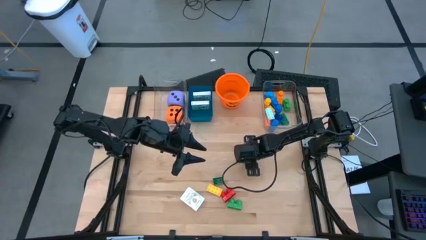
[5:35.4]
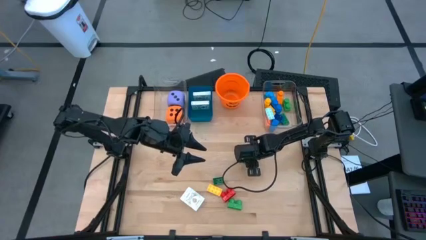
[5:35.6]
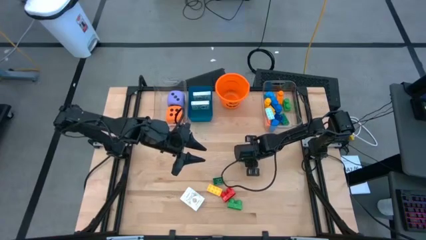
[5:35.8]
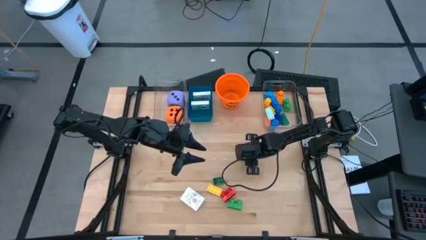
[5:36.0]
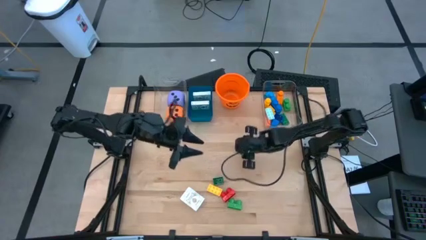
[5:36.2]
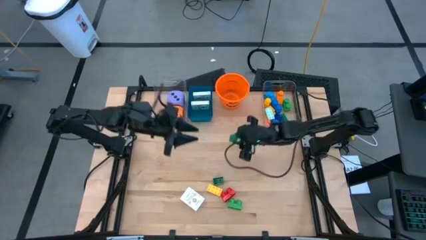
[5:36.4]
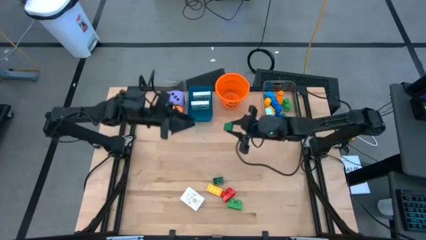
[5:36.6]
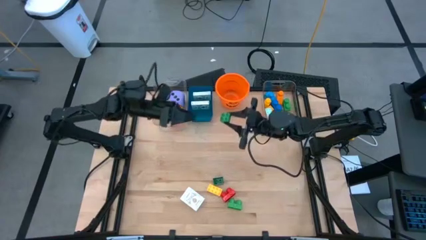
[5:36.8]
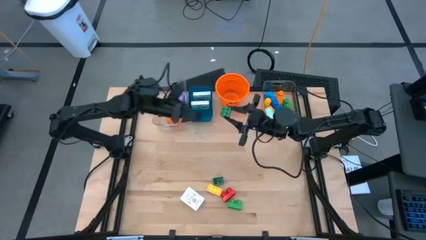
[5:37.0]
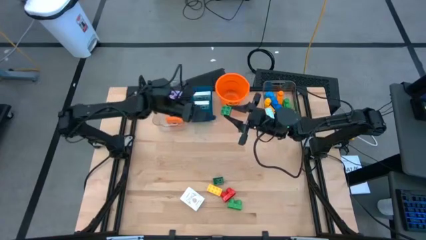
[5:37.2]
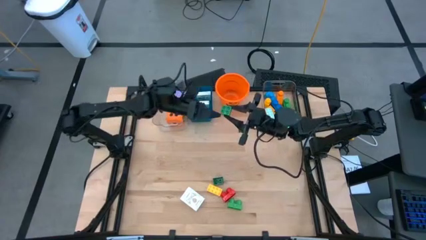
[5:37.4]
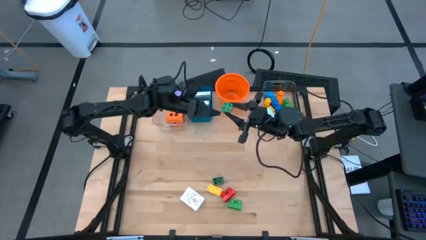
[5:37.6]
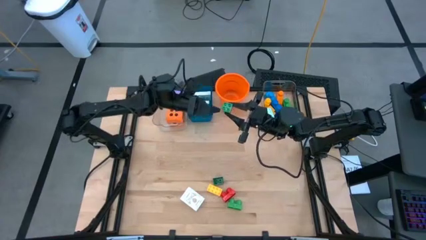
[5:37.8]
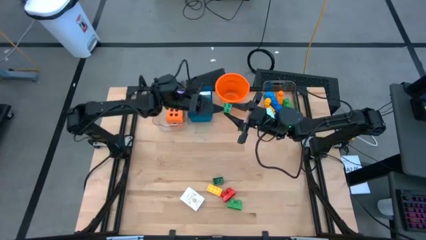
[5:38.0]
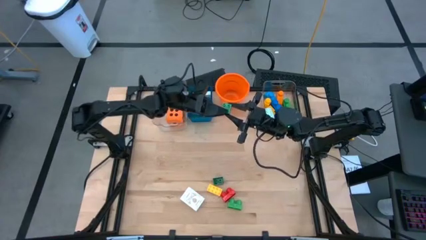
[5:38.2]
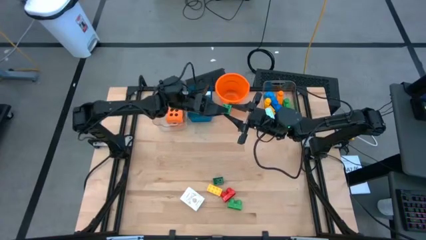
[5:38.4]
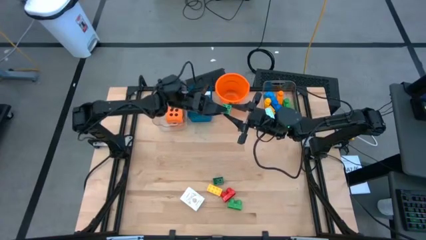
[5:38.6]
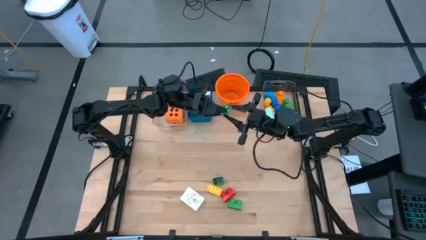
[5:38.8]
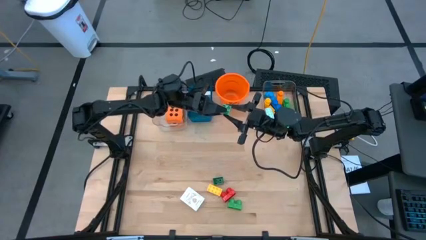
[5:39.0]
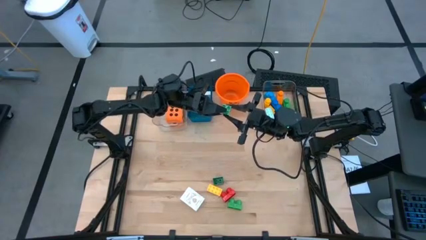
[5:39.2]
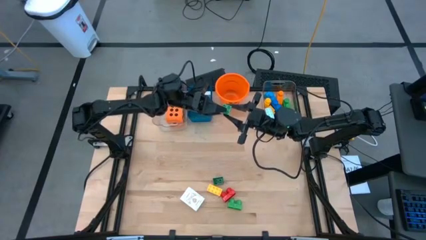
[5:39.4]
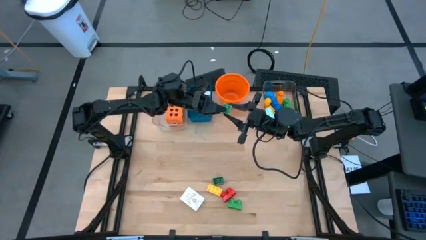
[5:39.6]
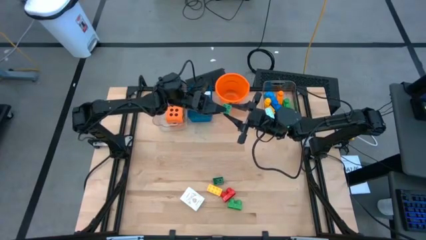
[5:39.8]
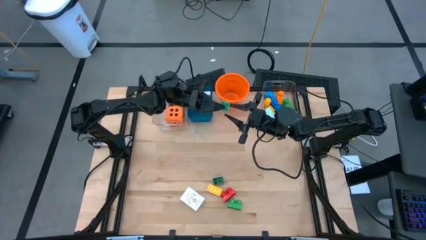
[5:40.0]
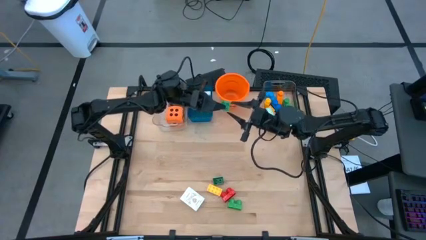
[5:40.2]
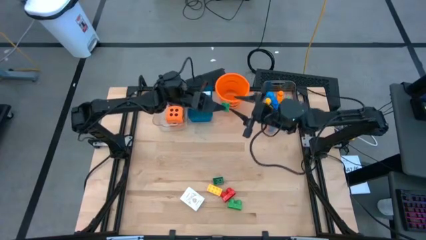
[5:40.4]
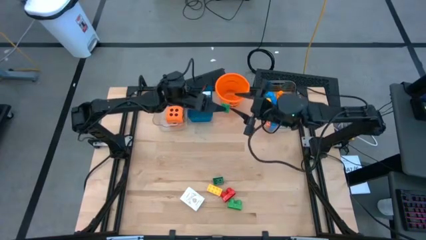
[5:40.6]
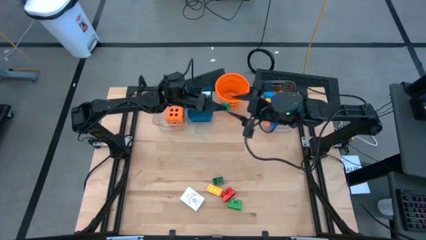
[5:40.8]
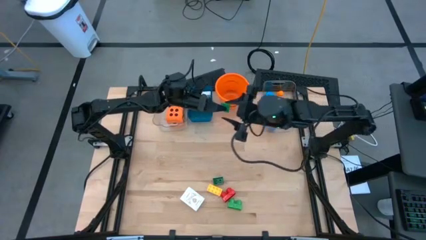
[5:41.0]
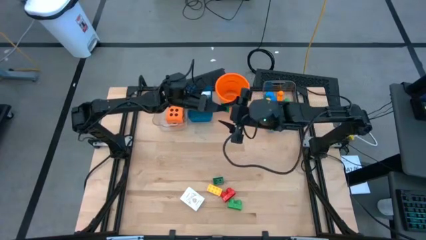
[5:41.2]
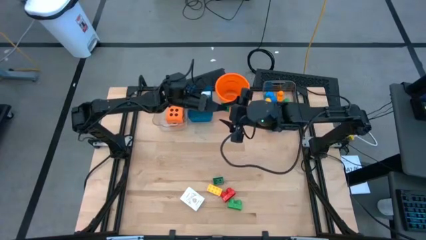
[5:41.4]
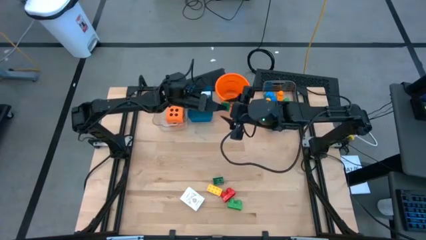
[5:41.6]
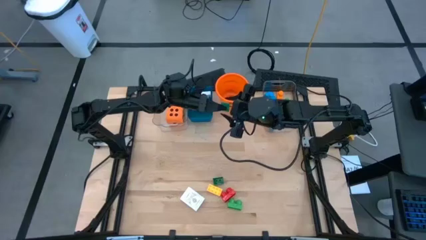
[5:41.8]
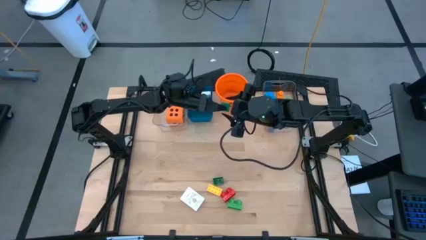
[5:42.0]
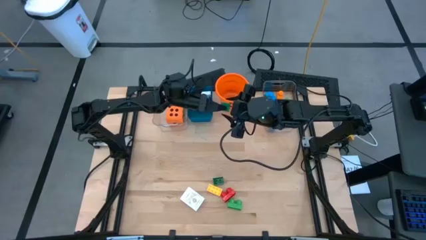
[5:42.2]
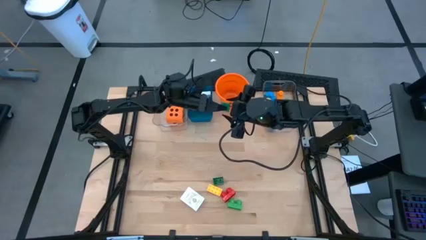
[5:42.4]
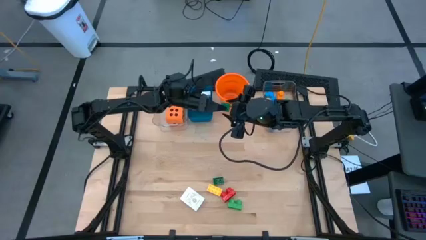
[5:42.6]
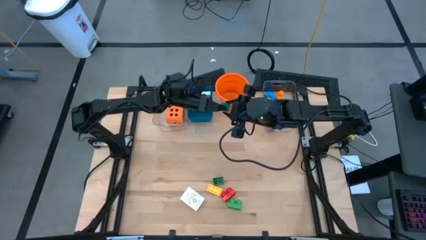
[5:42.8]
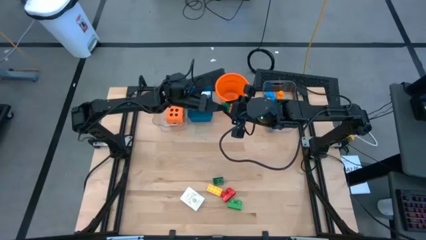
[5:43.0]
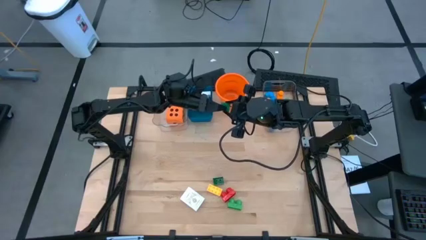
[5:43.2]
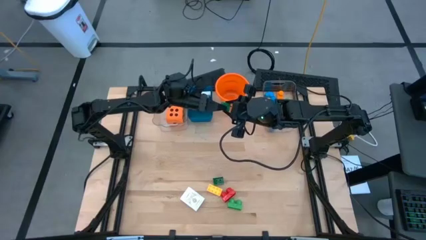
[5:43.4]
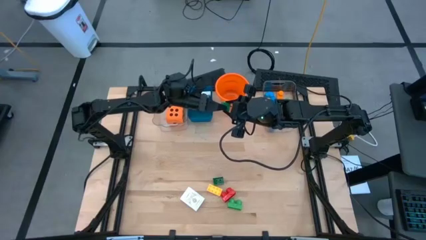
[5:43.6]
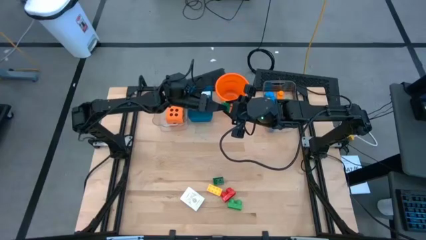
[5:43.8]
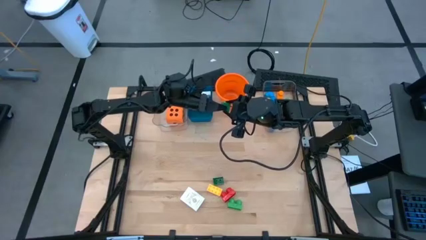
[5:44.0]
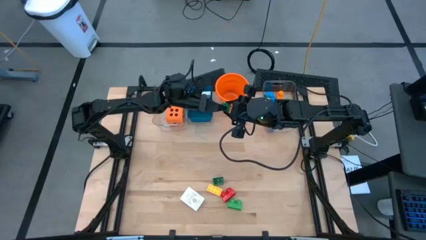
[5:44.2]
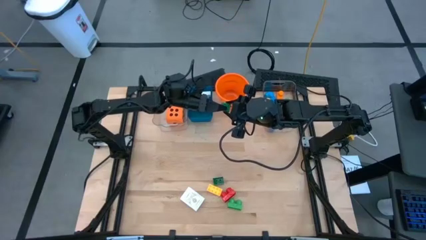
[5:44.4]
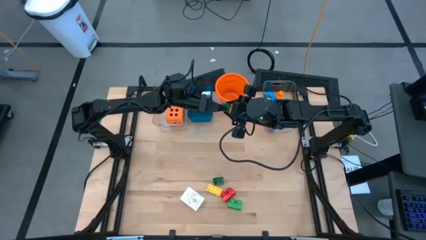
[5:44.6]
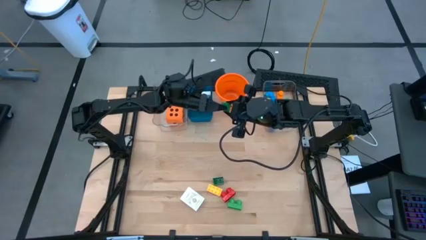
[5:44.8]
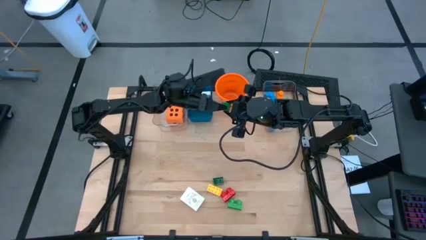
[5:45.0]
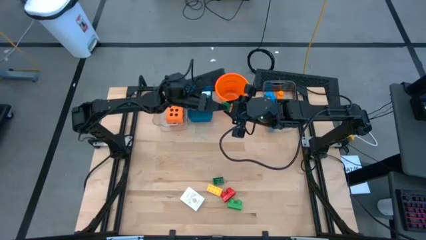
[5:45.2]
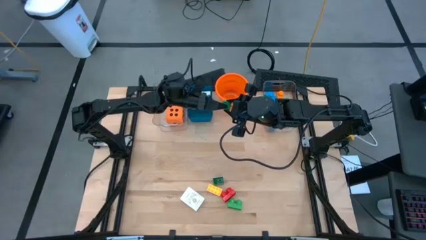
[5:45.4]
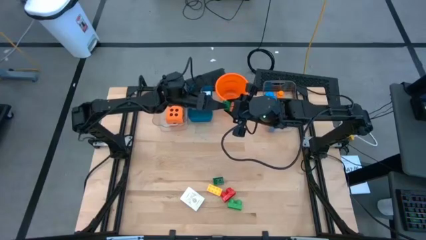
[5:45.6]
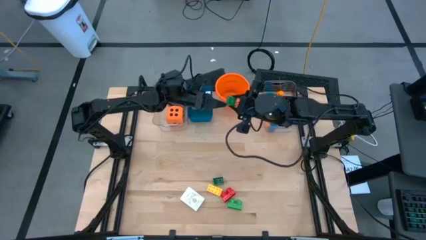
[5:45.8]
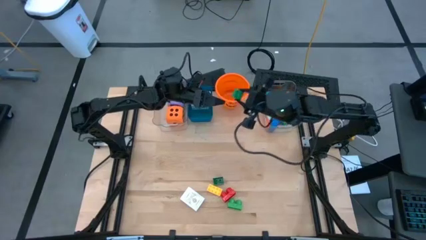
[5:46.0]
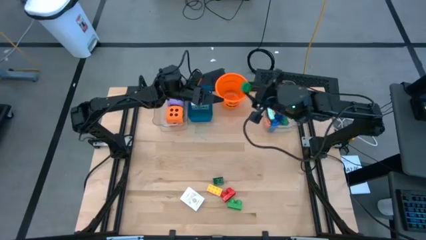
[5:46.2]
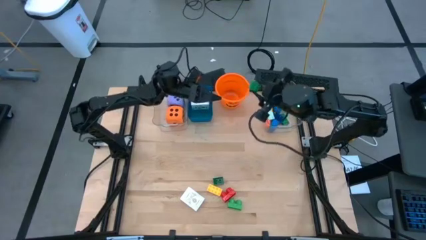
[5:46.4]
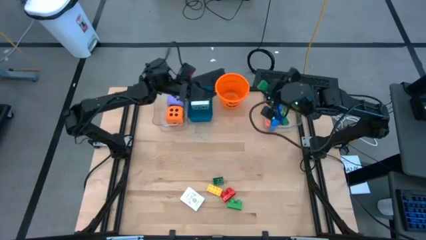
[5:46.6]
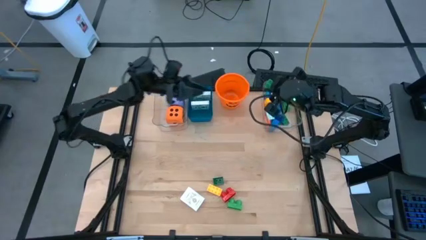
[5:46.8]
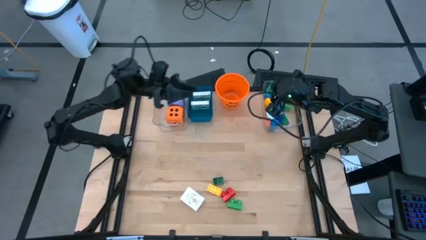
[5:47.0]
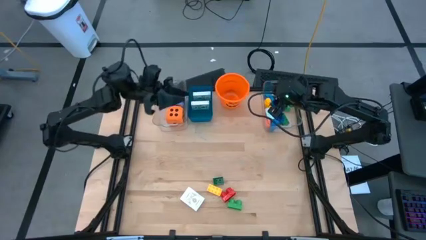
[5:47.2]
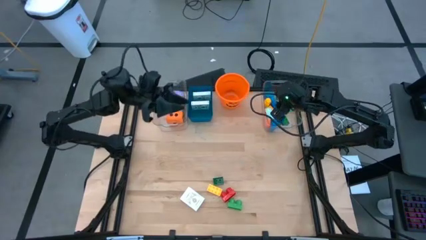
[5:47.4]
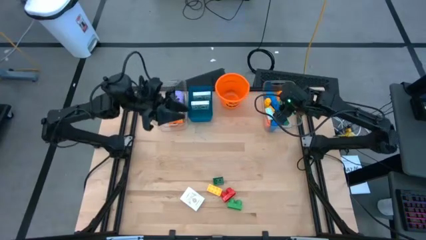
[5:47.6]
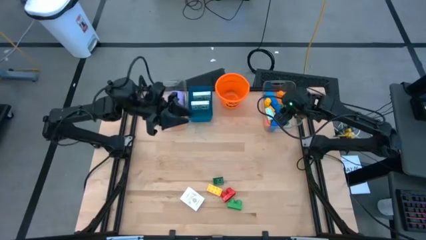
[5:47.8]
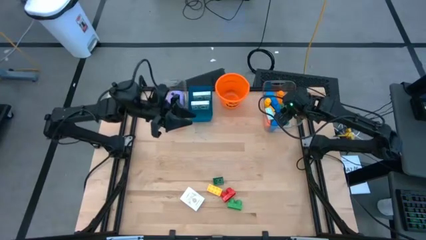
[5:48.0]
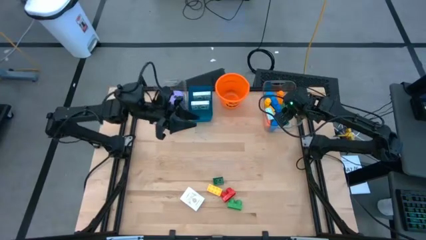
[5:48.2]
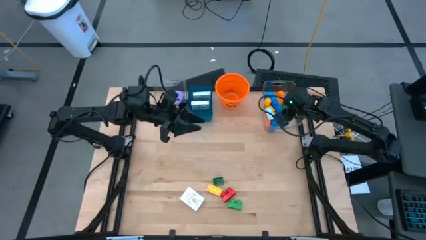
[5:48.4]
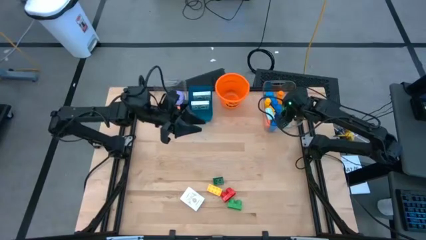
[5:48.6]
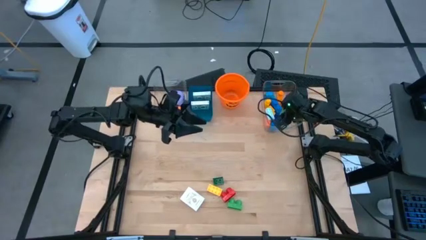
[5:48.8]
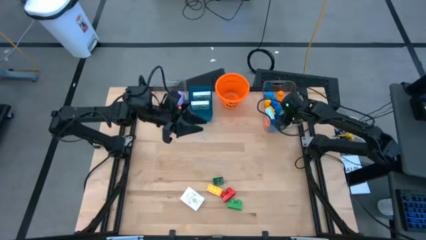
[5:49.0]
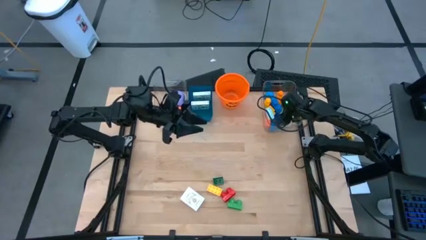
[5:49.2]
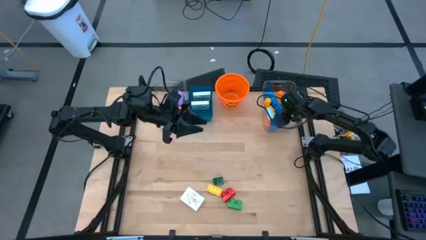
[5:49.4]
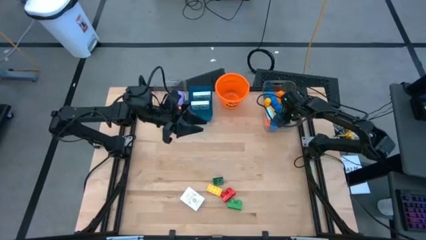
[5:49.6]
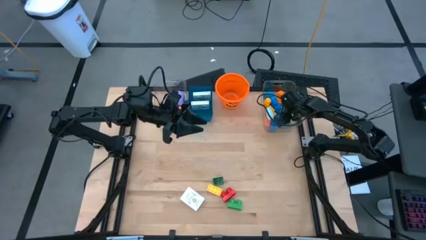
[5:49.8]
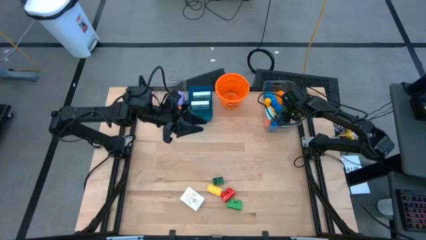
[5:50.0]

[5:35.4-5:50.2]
Task: Pick & Place Toys
Put the green game piece into the right transparent bin
